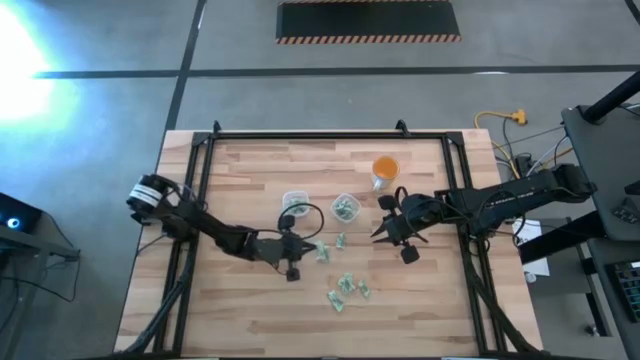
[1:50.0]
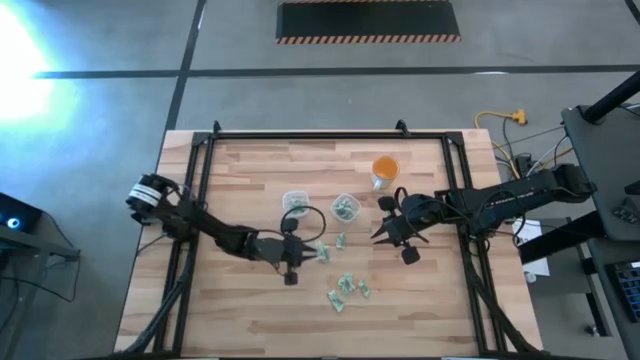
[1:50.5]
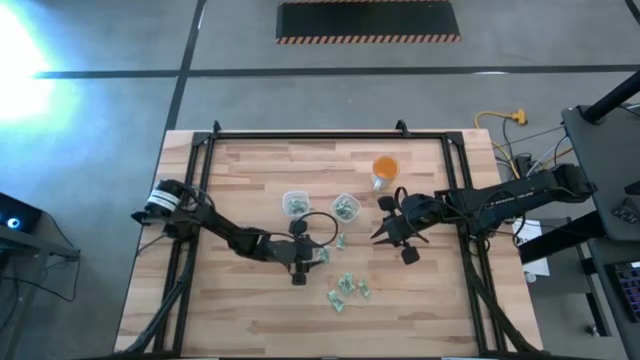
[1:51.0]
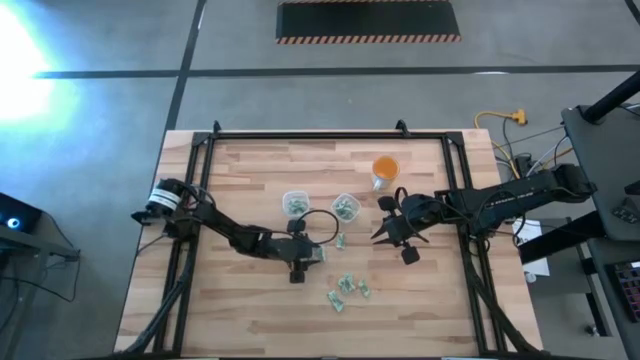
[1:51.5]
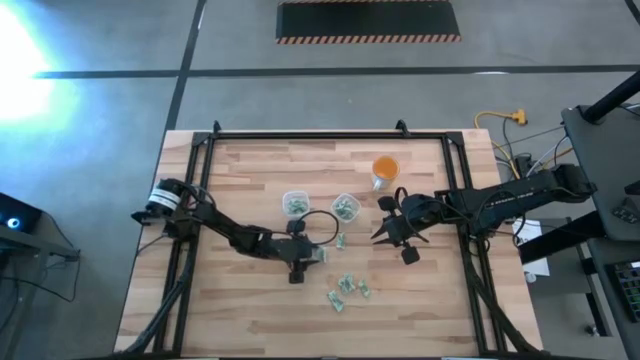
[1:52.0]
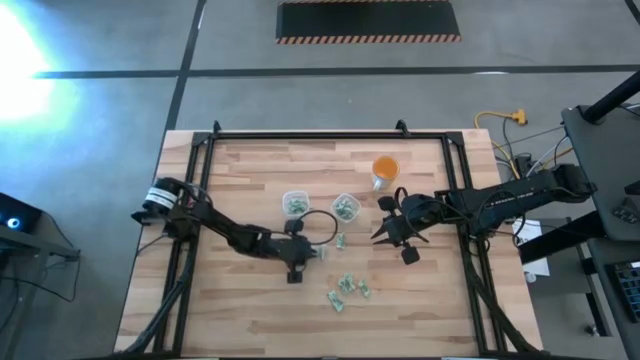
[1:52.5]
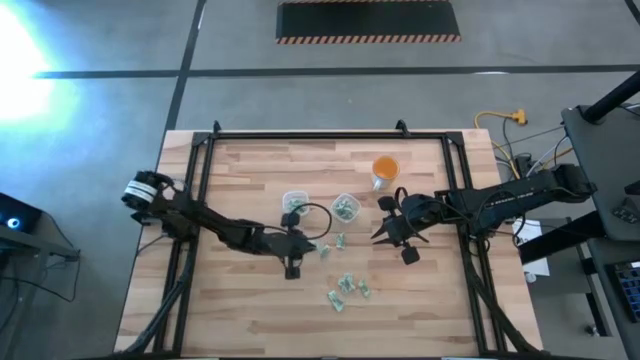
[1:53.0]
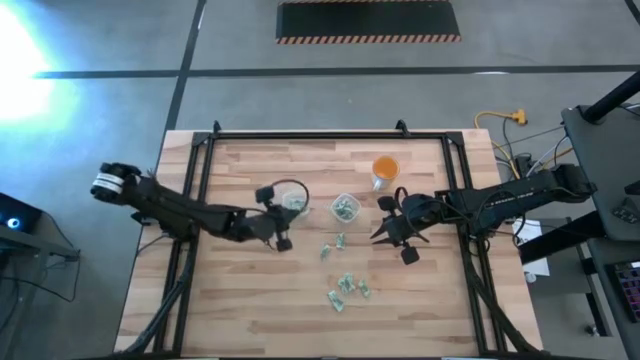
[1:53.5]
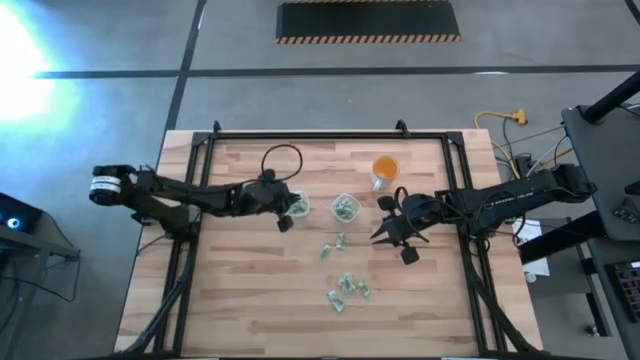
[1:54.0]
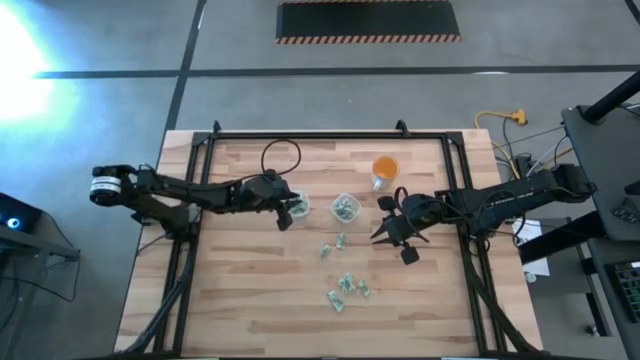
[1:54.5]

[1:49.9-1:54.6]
Task: Pick and place items into bin
Put the white stevia packet into the left transparent bin

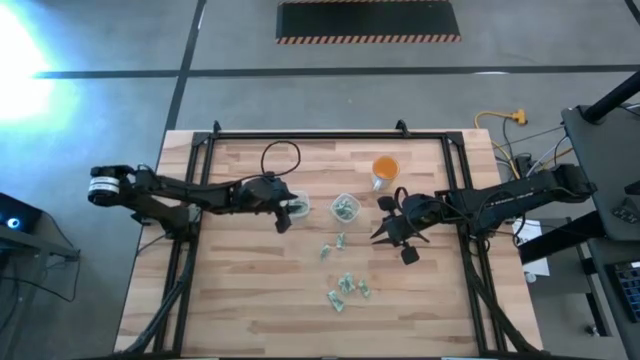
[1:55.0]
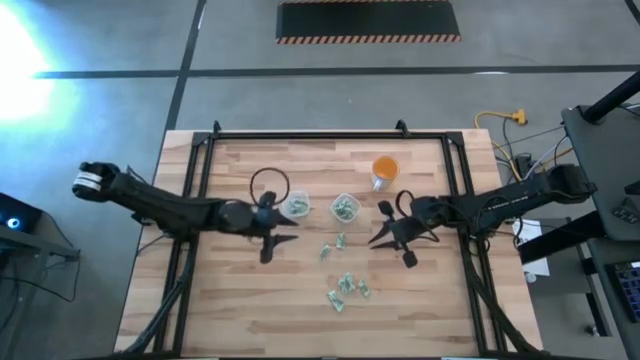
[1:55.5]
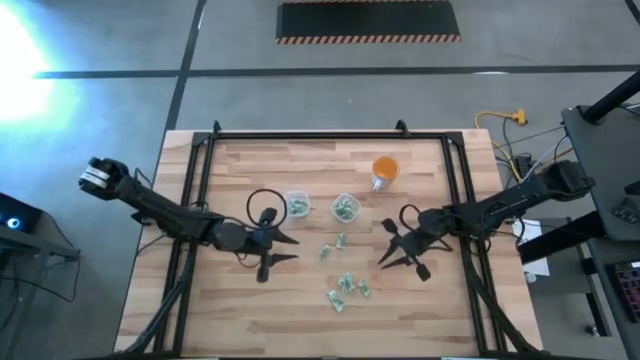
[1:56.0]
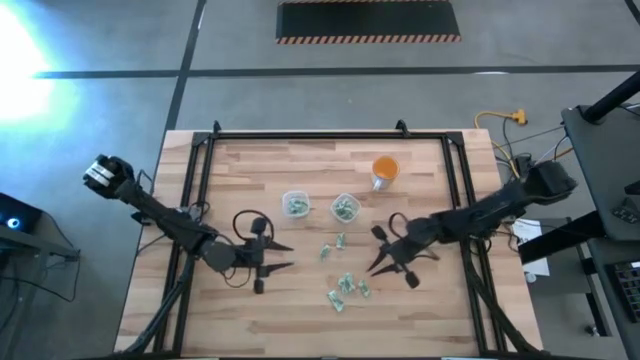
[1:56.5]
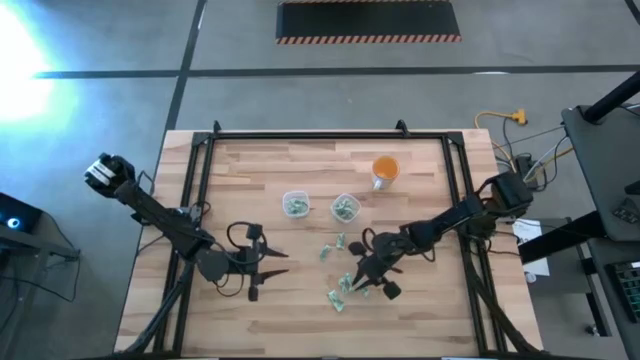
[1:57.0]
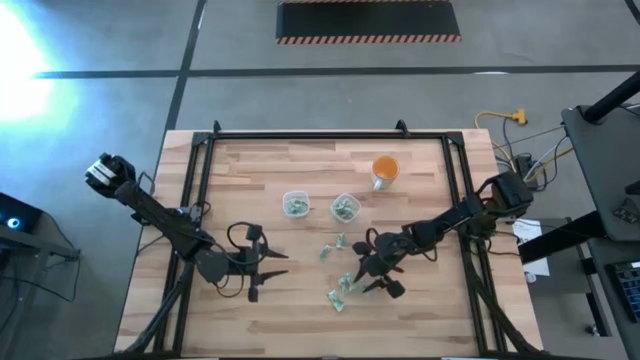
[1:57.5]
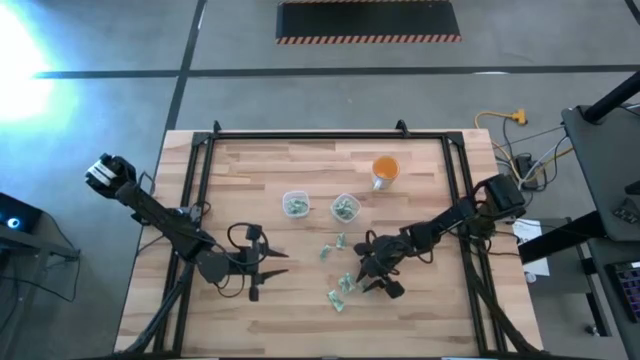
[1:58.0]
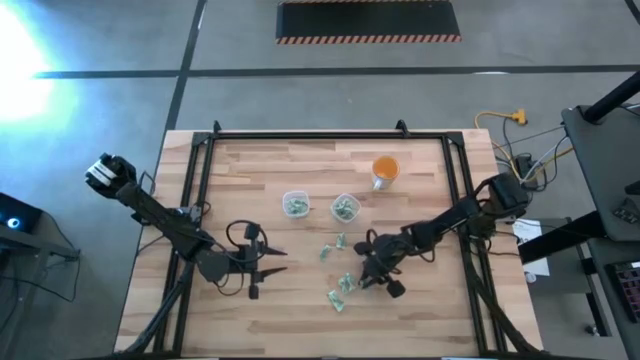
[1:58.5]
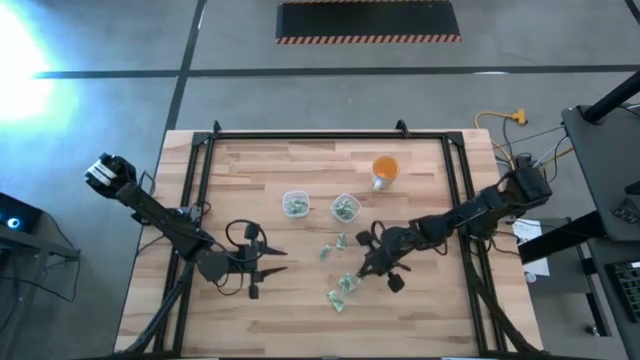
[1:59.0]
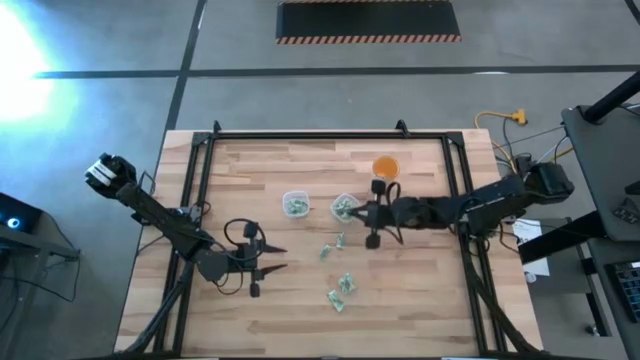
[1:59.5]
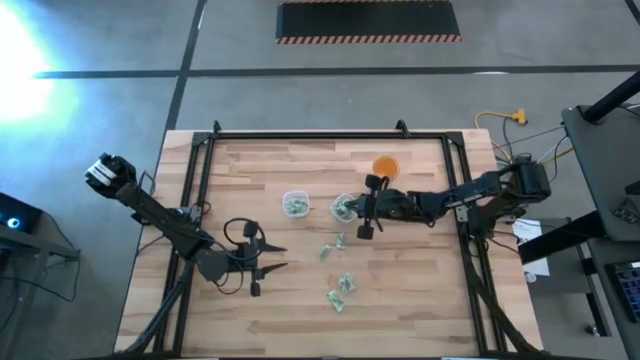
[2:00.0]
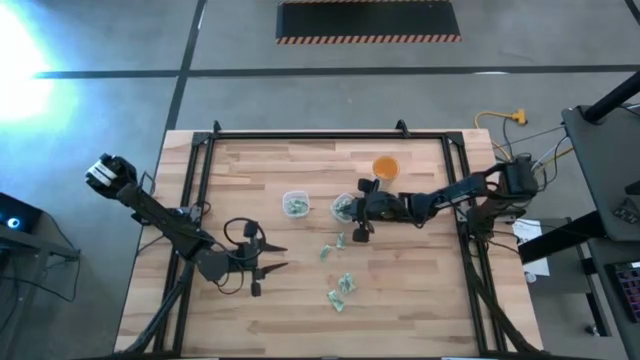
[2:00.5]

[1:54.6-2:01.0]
Put the white stevia packet into the right transparent bin

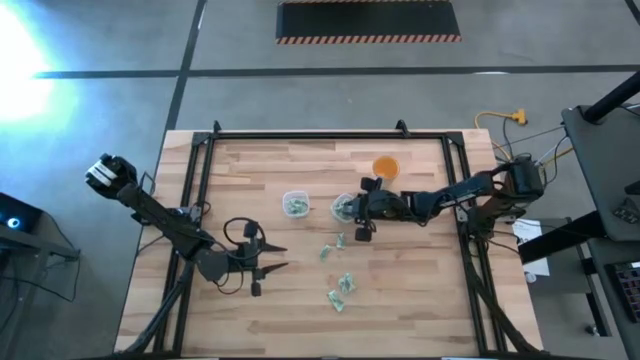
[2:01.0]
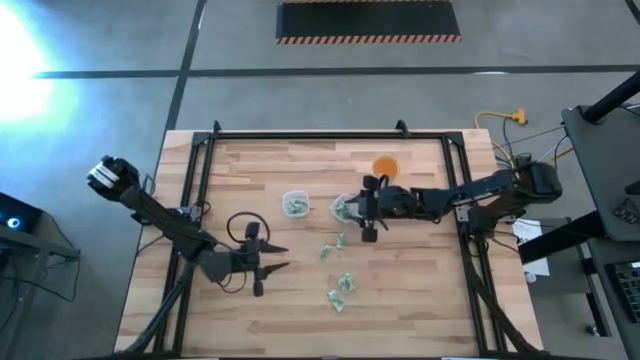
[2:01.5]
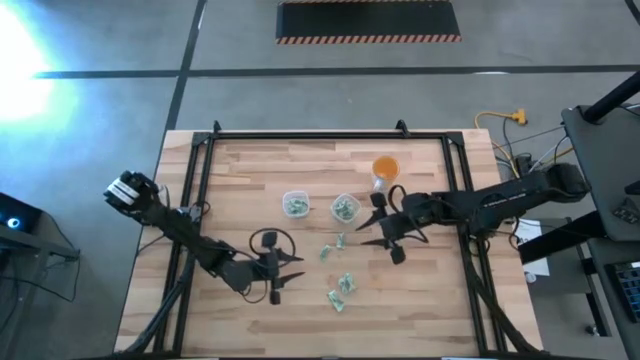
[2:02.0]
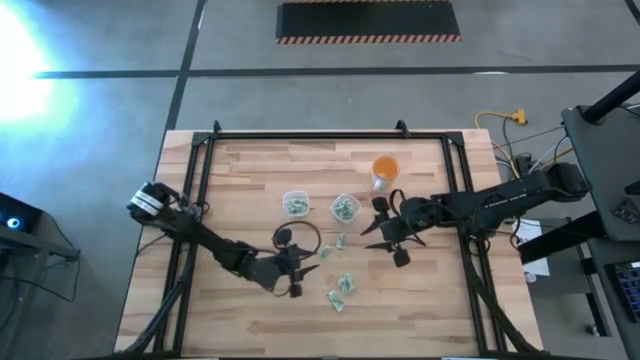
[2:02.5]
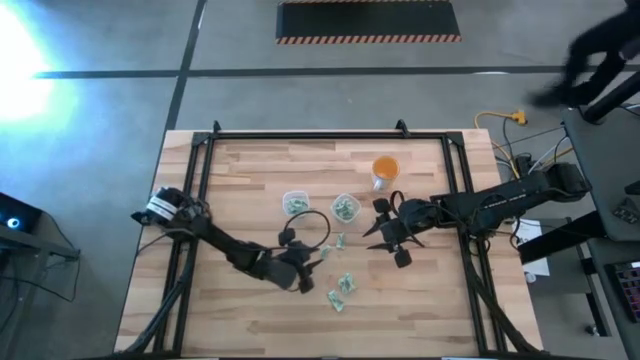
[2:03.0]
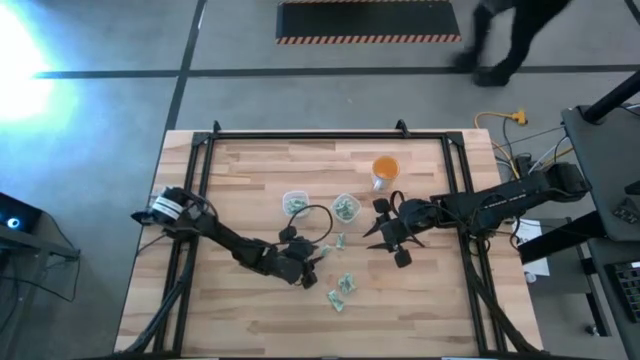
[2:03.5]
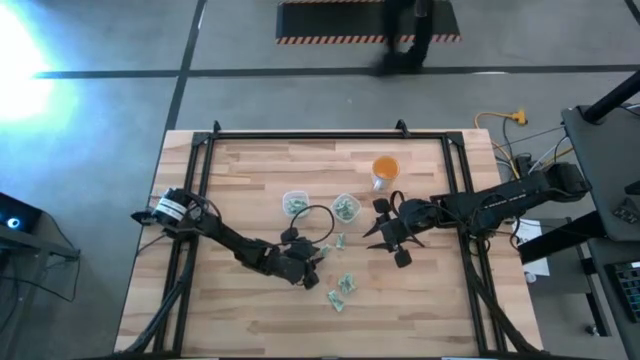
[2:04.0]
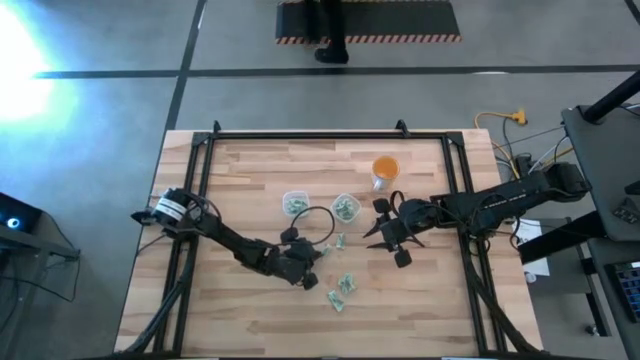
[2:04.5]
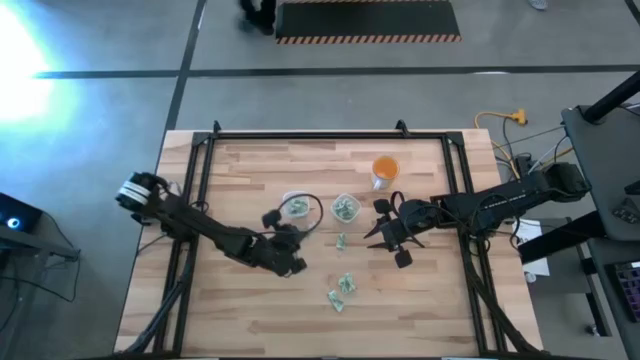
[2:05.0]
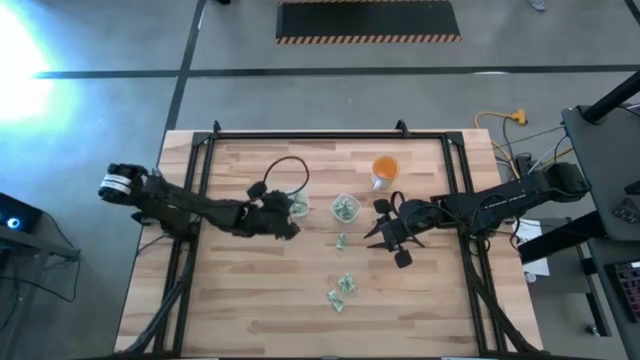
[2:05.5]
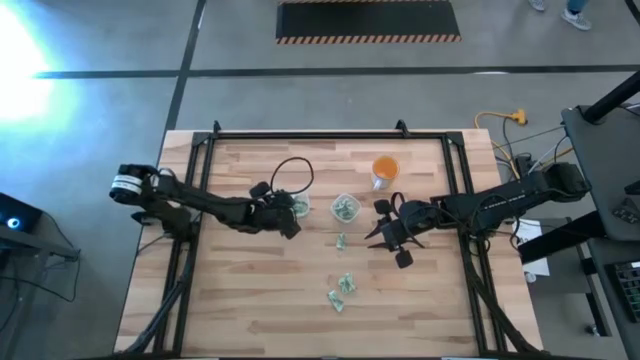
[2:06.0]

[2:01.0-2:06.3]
Put the white stevia packet into the left transparent bin

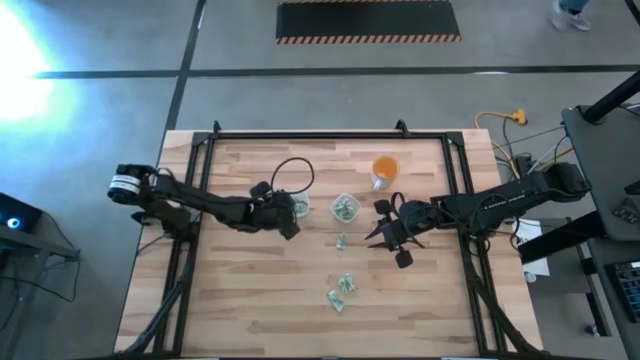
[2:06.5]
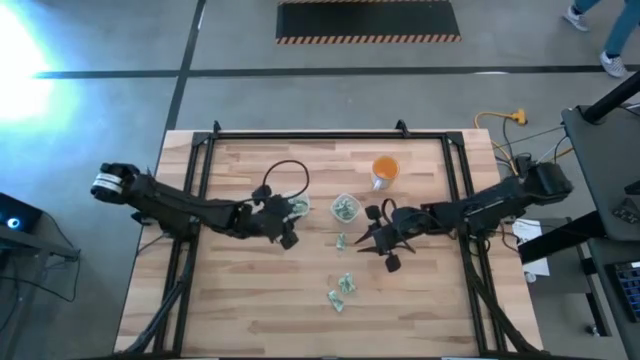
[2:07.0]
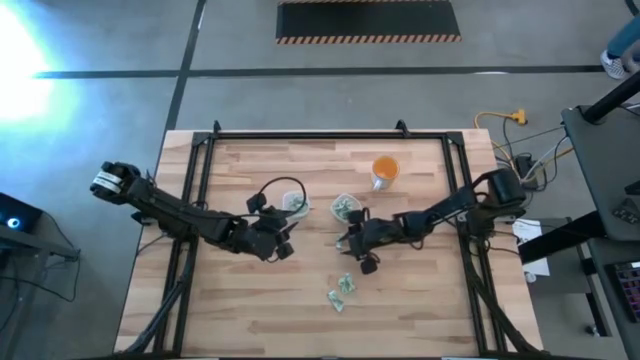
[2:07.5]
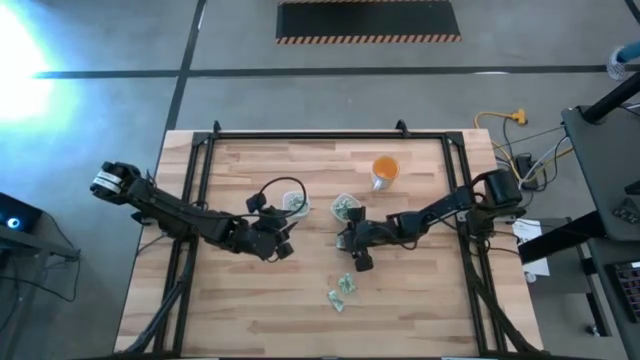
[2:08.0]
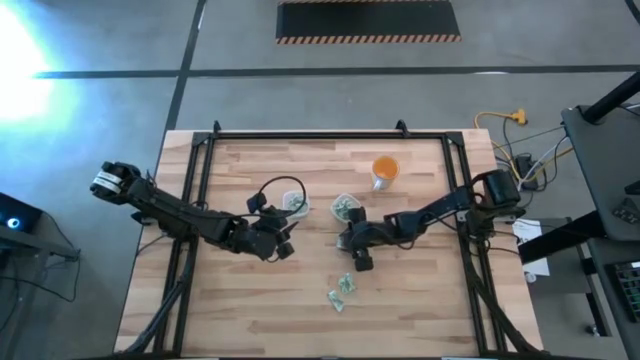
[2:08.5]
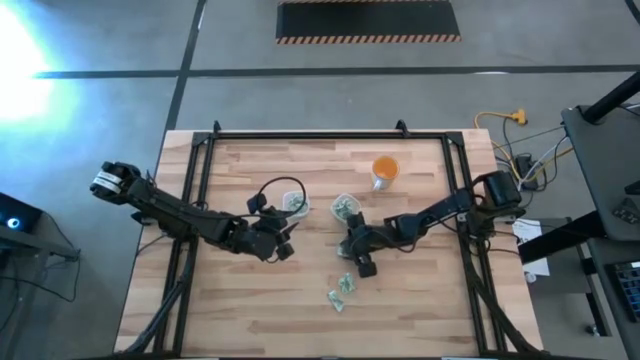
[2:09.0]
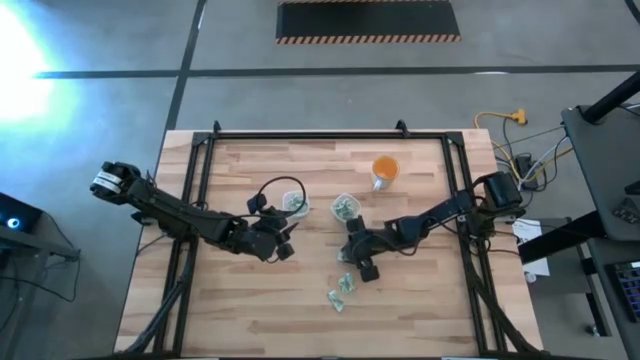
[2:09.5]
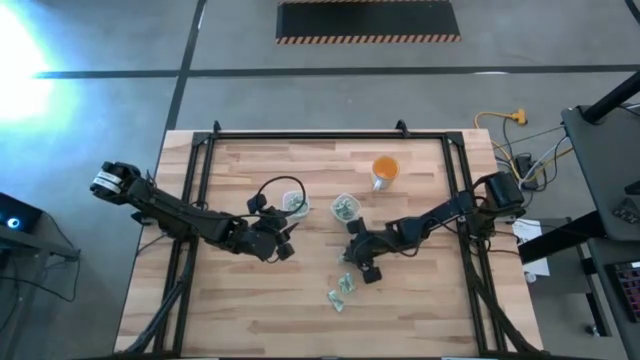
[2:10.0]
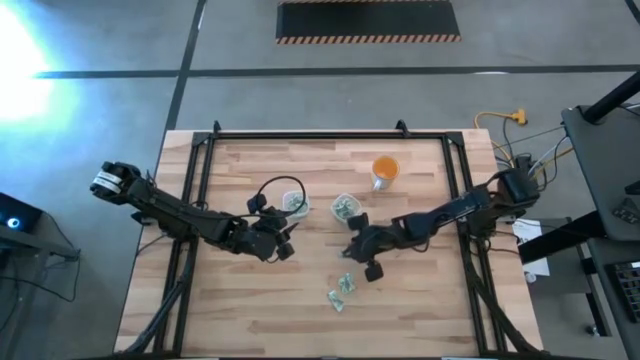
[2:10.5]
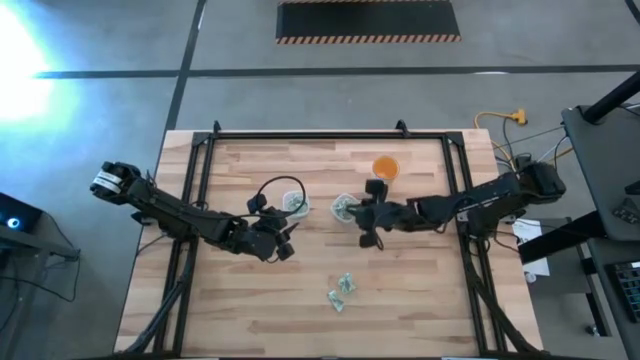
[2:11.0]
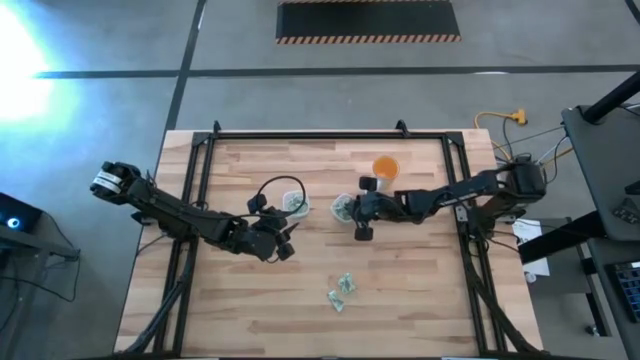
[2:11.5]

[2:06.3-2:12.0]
Put the white stevia packet into the right transparent bin
